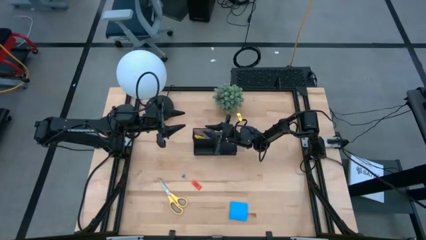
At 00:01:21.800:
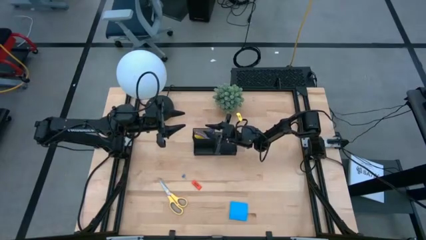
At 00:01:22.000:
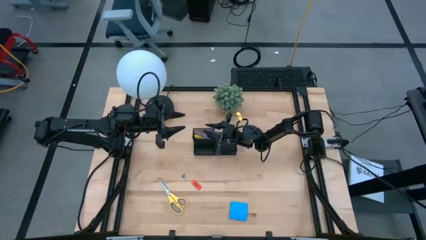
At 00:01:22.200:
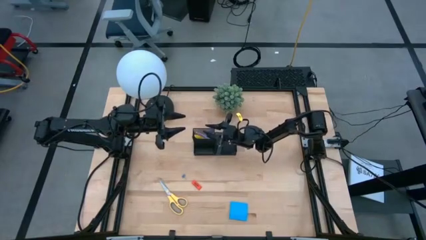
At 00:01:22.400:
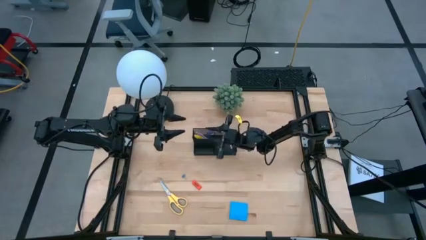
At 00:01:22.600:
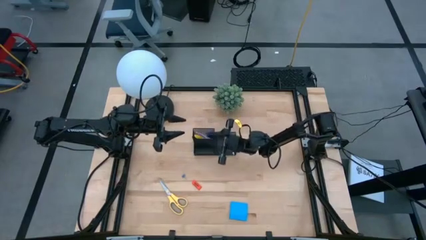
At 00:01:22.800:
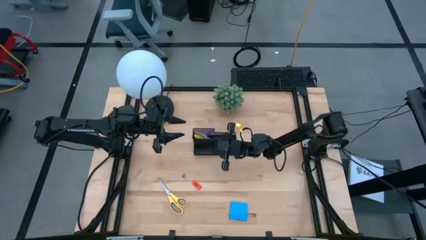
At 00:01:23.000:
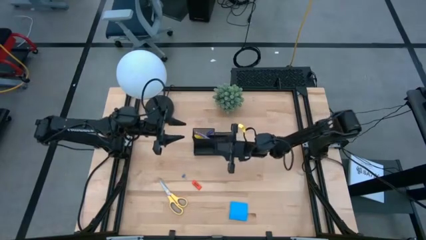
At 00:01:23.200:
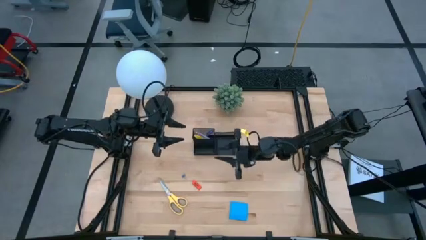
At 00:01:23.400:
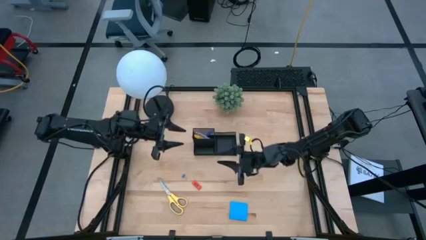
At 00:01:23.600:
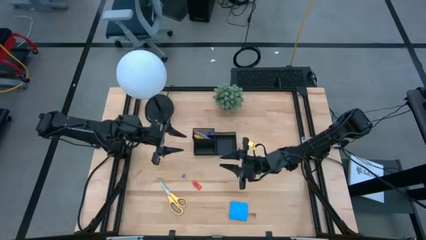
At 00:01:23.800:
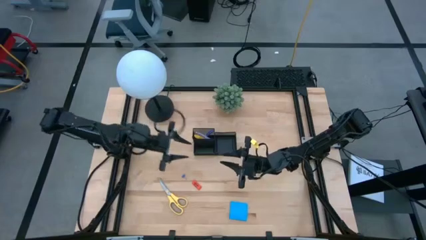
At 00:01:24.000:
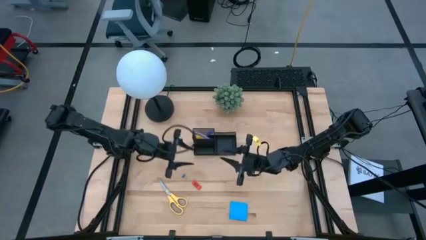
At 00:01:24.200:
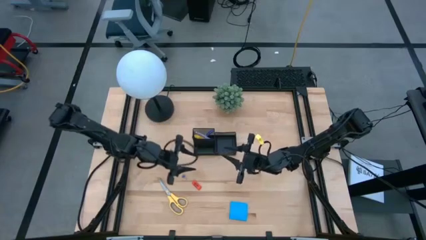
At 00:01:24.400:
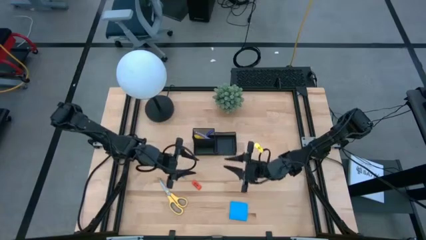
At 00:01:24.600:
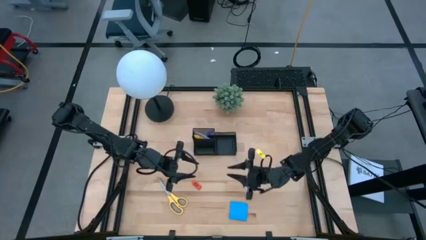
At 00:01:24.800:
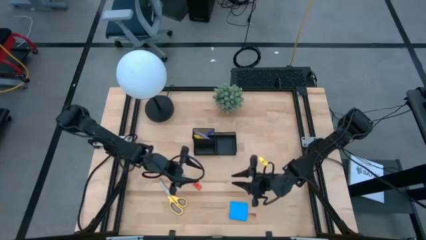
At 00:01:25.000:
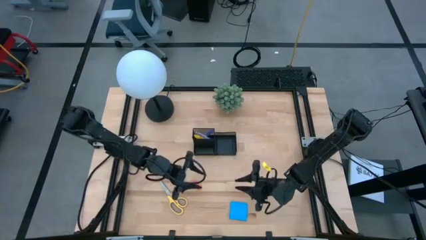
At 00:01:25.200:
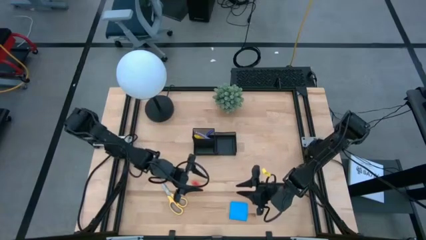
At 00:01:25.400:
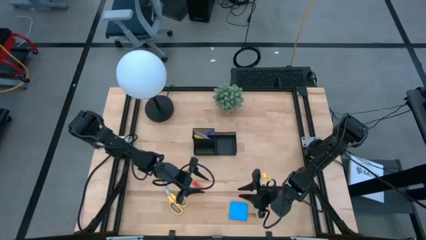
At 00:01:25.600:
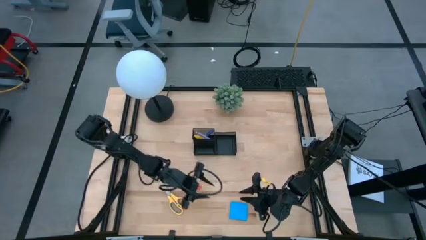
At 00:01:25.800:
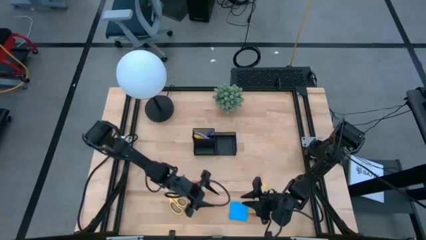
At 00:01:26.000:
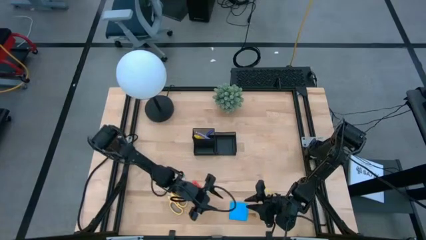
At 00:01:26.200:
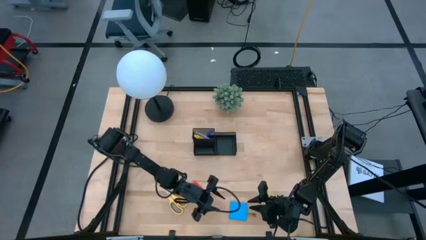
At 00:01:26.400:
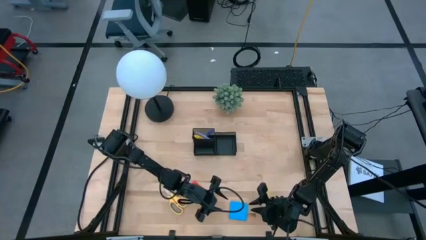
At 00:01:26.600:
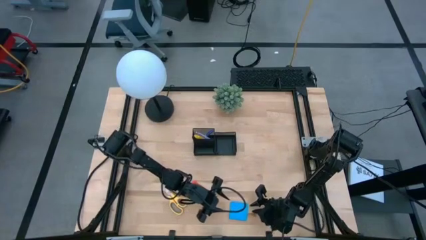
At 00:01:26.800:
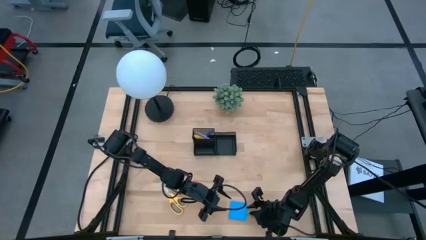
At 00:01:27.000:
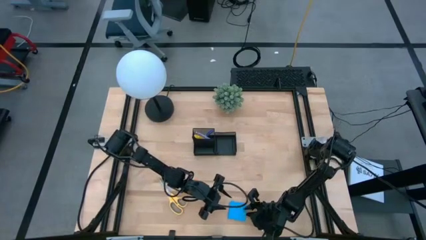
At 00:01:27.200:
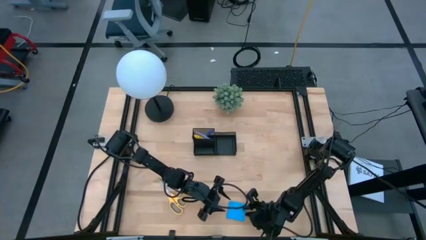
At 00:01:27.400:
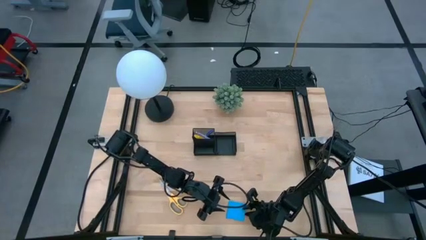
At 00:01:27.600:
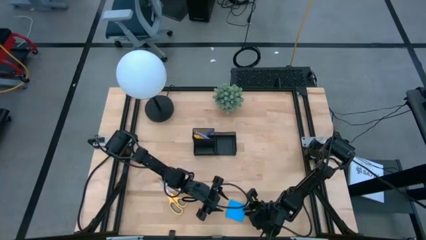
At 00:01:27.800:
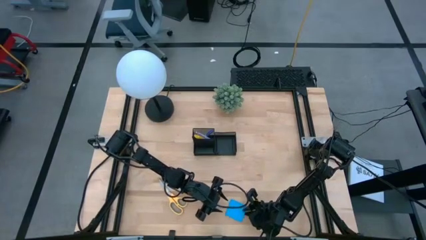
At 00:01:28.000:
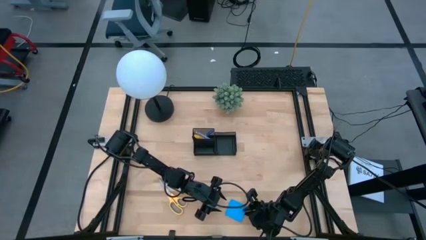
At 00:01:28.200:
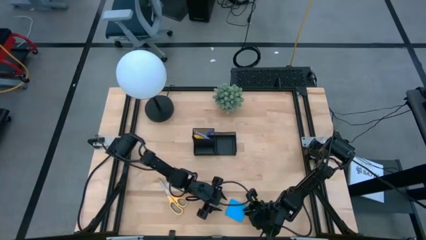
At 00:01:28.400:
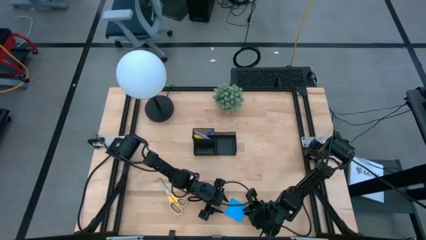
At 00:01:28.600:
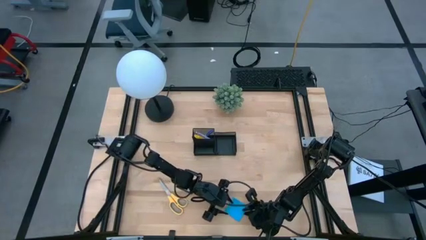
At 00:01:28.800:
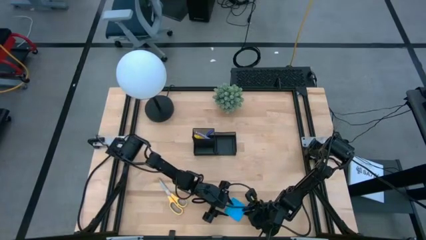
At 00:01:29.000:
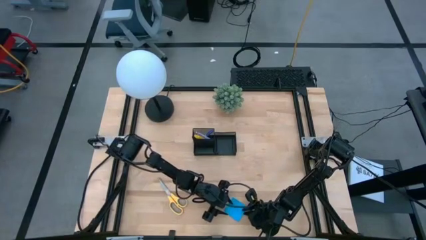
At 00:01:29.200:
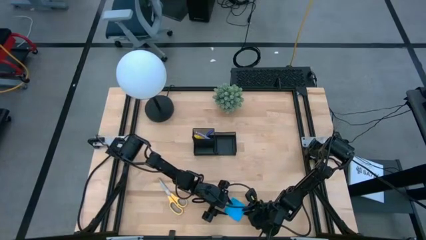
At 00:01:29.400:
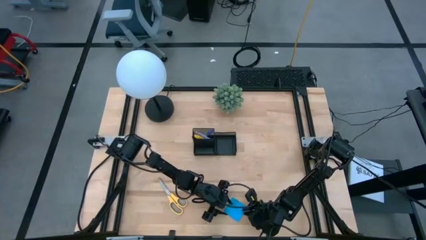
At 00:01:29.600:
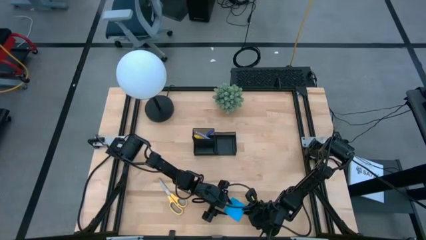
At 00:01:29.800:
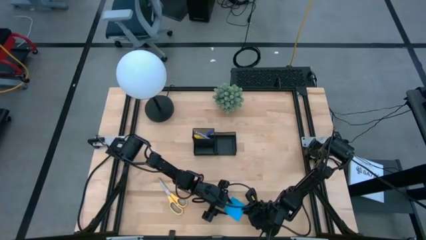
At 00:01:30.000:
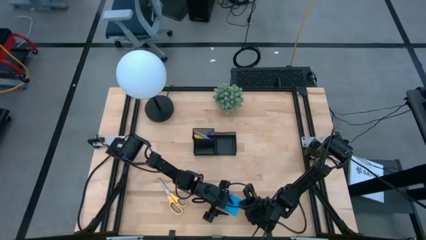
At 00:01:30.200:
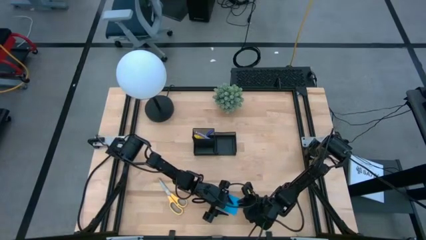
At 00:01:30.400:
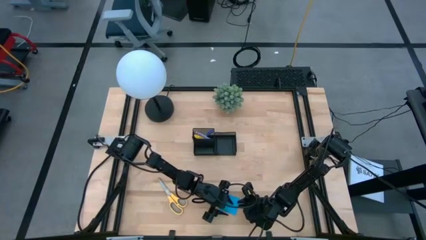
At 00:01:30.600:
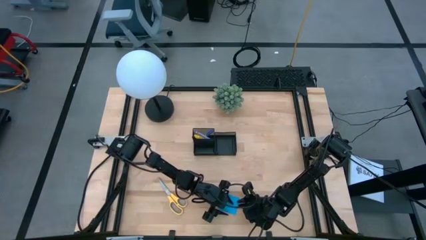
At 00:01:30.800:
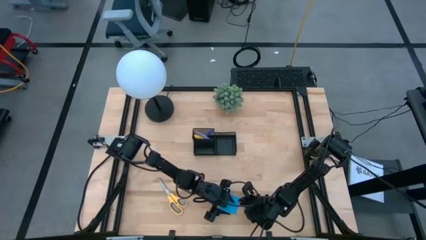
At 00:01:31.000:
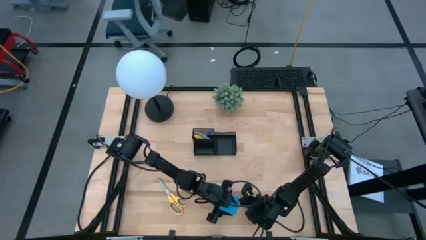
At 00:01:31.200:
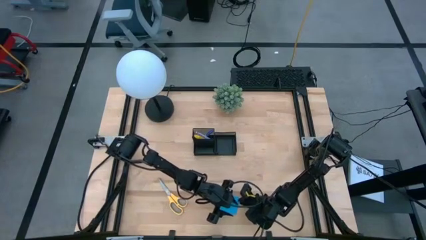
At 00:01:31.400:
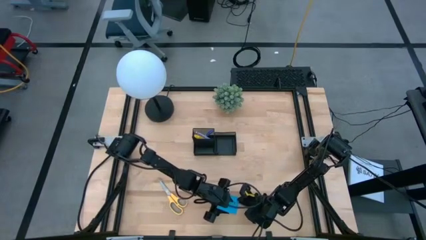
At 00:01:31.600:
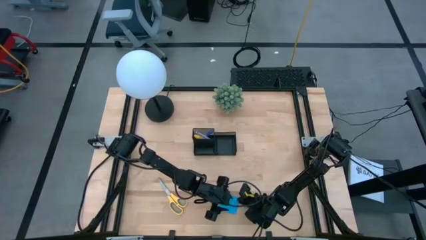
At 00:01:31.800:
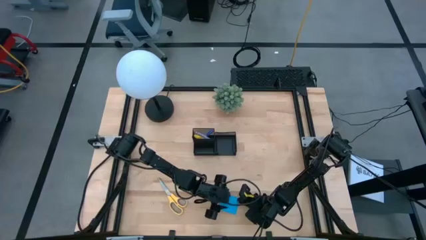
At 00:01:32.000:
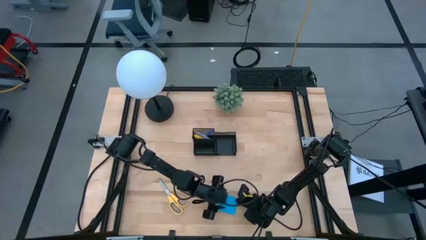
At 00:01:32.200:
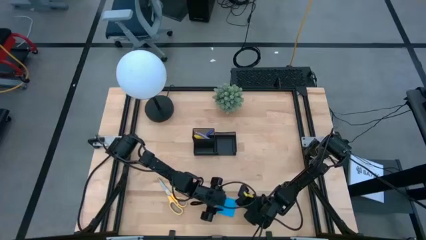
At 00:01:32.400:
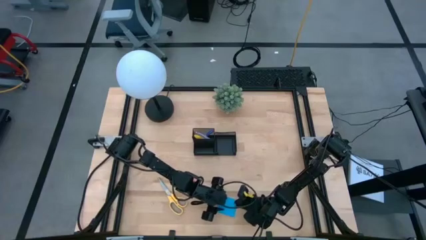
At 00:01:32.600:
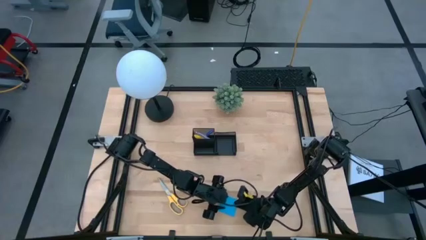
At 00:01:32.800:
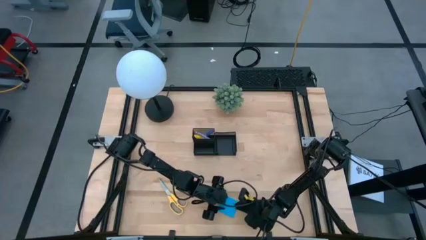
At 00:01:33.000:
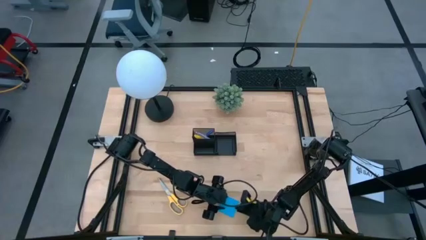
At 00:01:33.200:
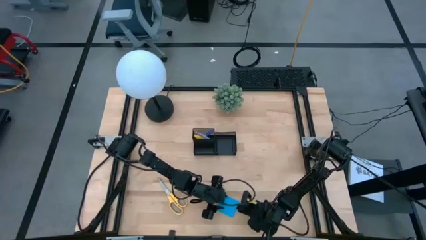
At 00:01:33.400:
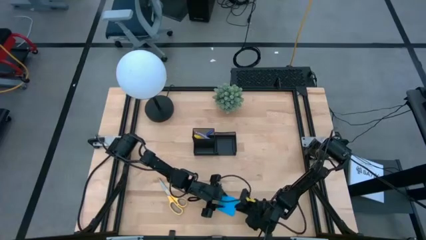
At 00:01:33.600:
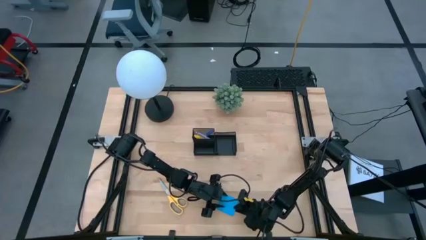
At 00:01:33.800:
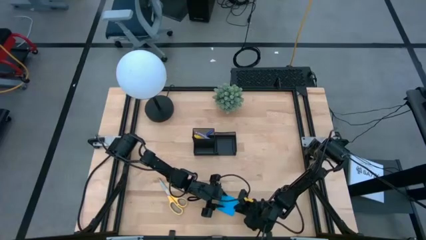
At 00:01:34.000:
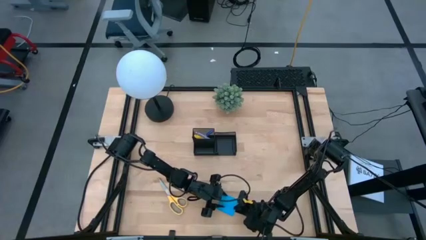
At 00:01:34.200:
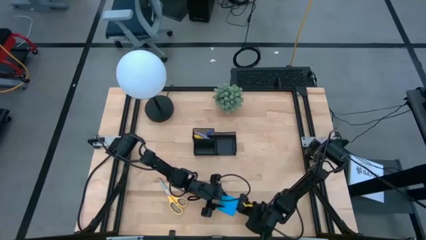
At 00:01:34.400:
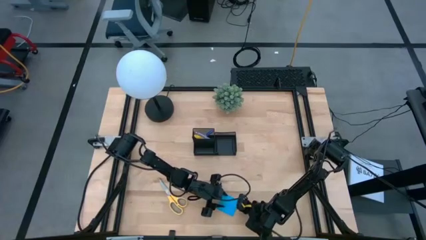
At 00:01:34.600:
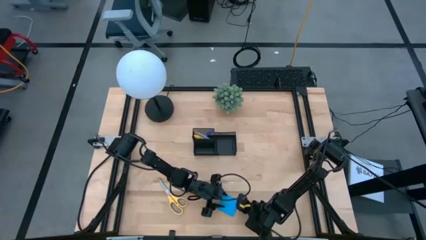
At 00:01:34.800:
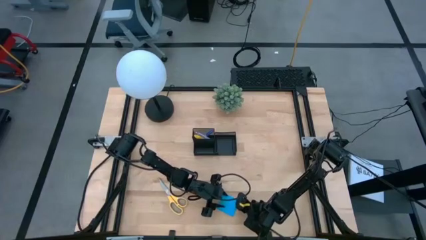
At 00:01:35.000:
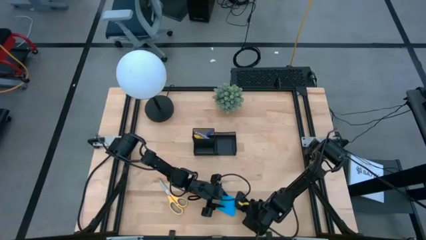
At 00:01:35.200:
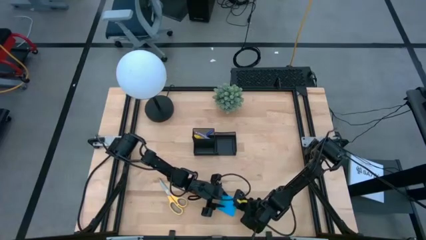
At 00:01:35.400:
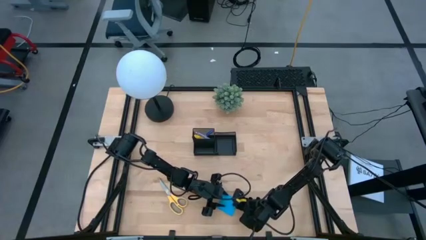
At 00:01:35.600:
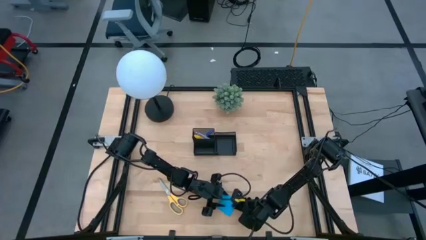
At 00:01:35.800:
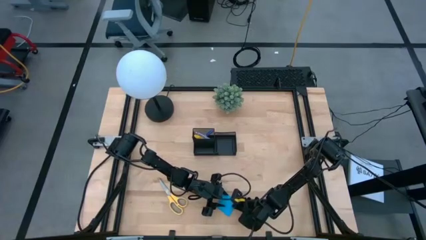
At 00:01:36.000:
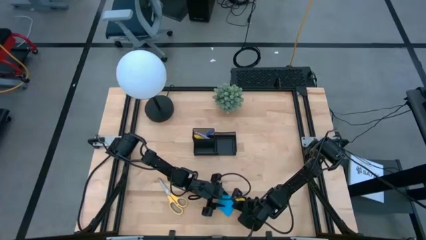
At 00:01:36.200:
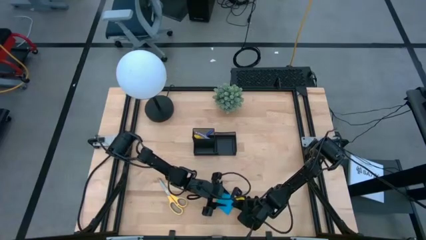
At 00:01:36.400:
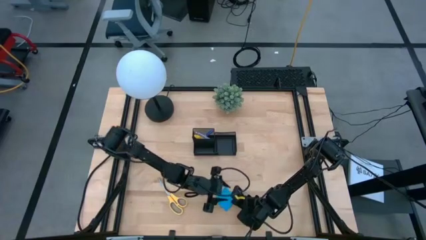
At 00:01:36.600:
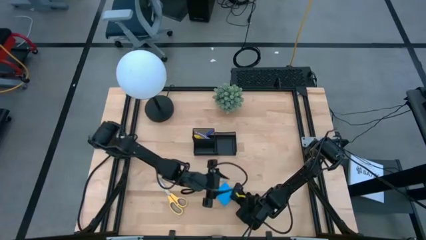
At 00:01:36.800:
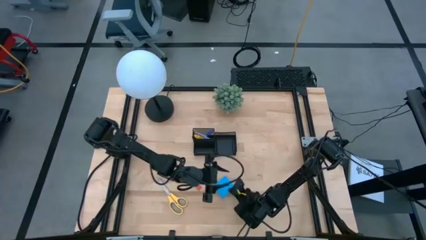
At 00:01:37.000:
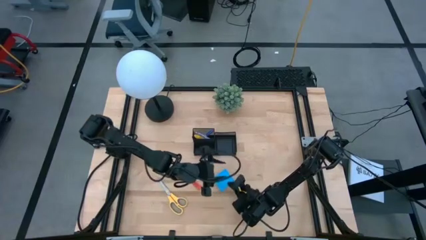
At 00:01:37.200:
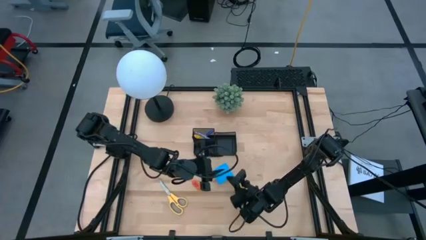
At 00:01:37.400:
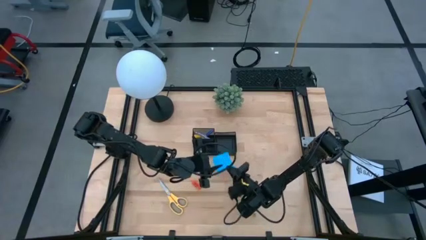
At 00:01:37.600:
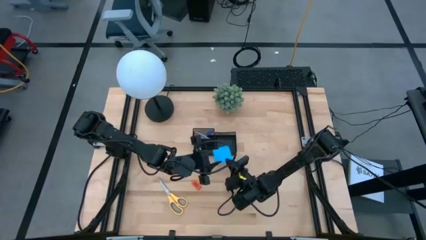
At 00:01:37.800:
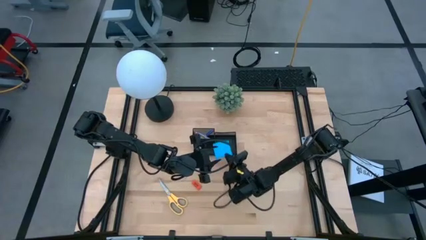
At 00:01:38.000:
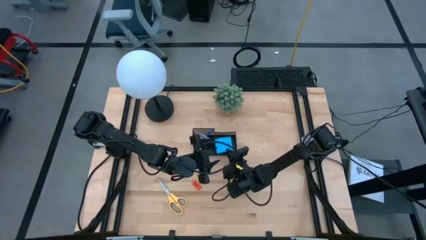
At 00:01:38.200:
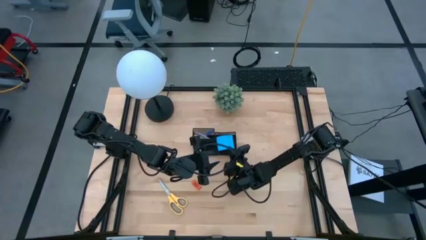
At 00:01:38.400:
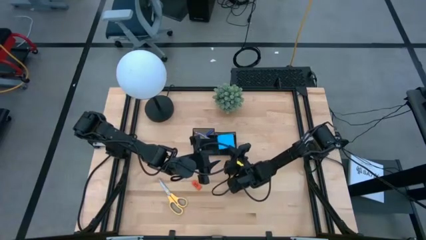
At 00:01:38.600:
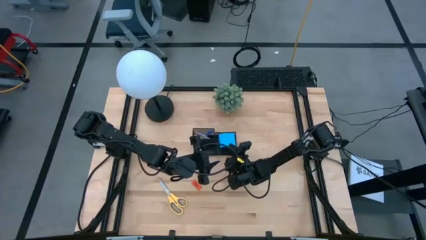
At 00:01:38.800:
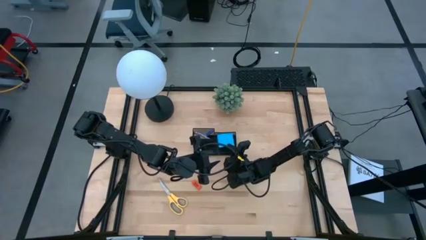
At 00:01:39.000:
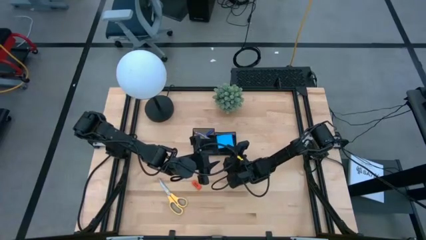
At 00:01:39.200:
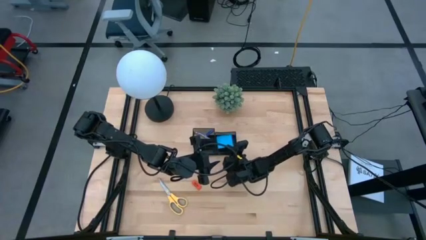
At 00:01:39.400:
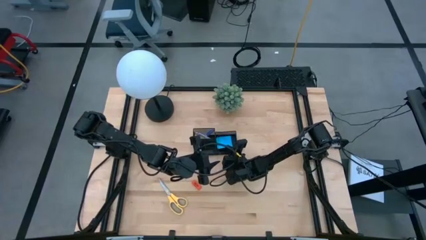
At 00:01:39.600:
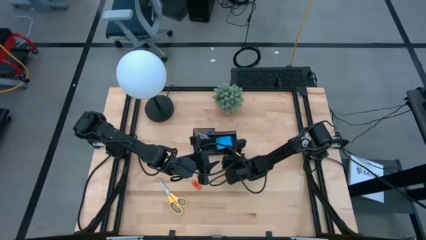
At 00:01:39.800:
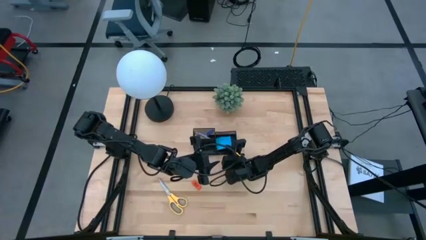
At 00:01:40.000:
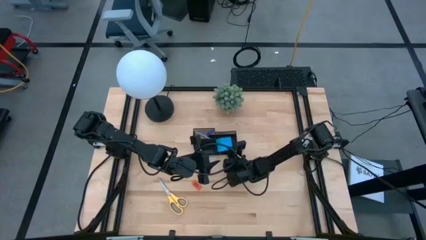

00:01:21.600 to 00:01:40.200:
Task: Pick and place office supplies into organizer
Put the sticky notes into the desk organizer
